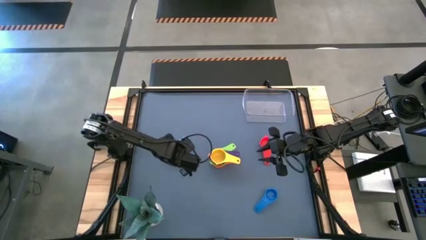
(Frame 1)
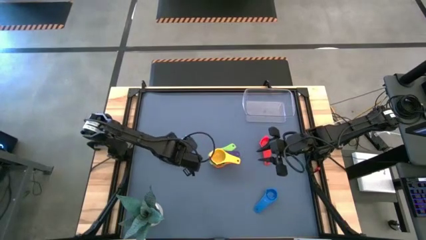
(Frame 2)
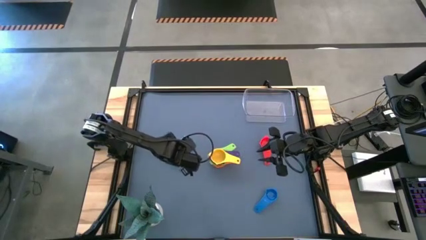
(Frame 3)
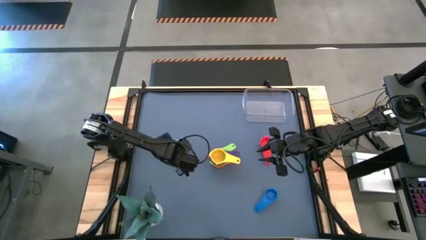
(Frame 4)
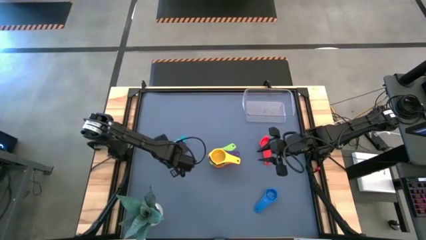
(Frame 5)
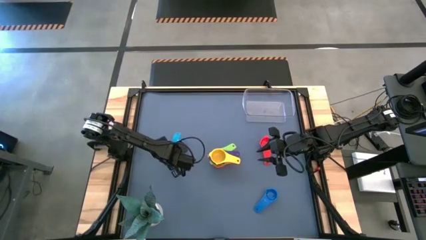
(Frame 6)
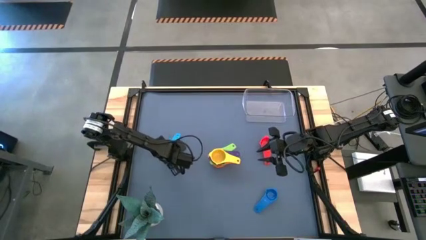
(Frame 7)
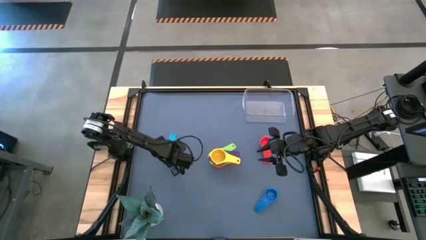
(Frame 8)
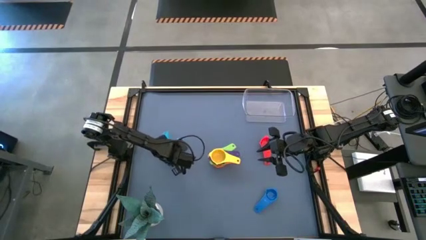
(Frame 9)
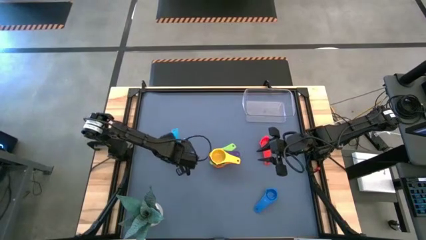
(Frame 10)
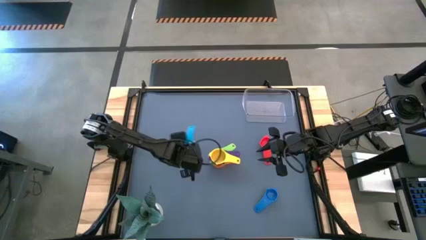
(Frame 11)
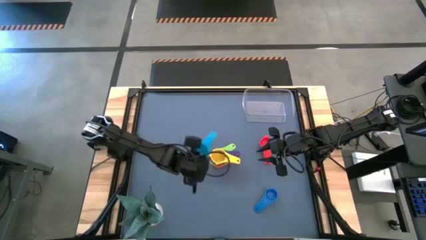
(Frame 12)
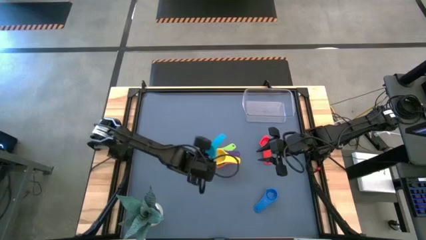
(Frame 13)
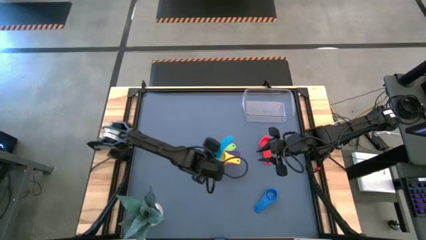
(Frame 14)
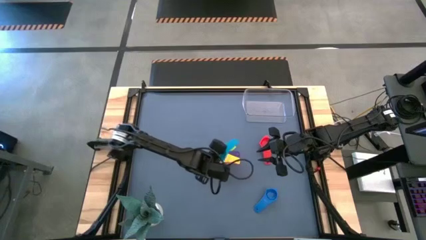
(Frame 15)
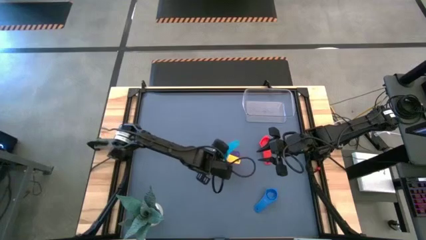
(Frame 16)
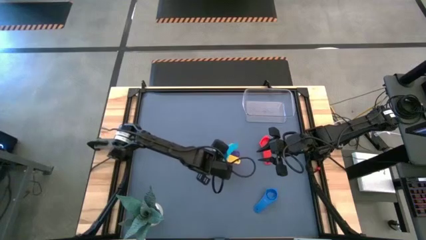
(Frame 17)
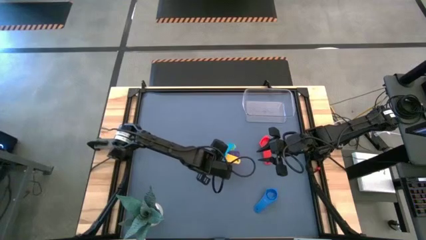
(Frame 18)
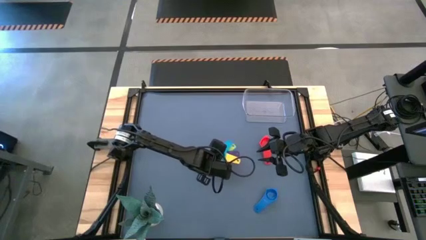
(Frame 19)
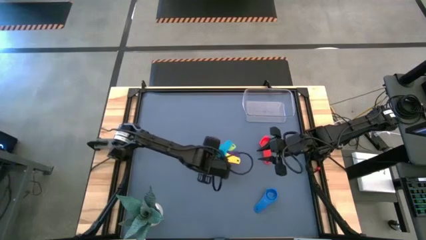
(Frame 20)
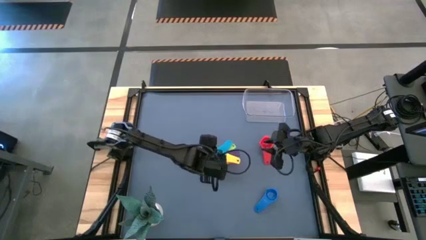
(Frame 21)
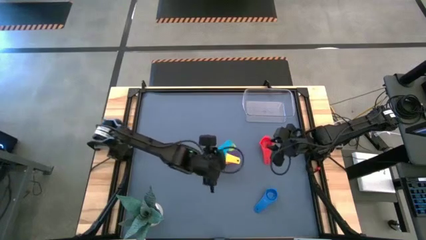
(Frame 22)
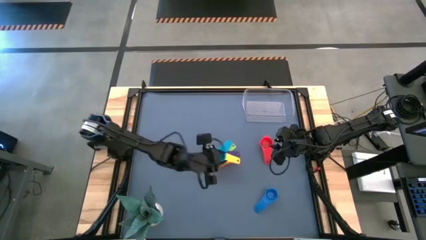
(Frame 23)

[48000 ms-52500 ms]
Task: Nest measuring cups in basket
Stack the sky blue measuring cup on top of the yellow measuring cup

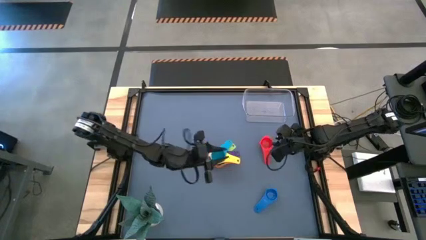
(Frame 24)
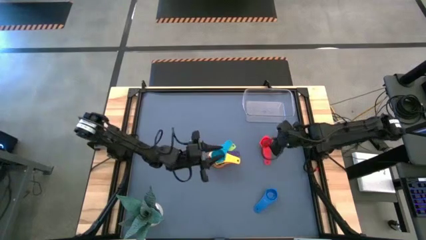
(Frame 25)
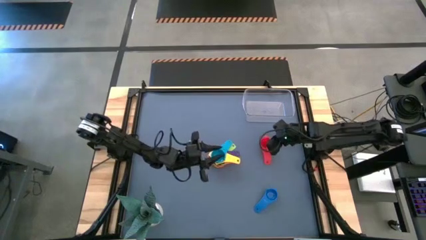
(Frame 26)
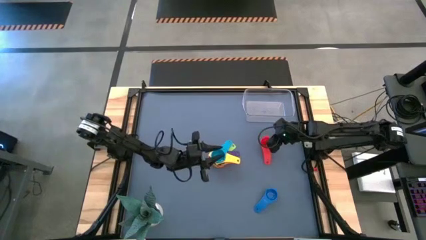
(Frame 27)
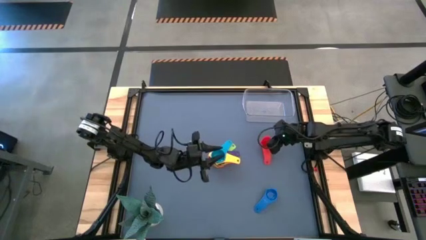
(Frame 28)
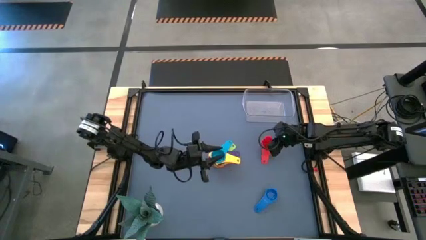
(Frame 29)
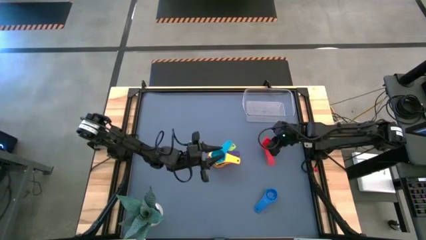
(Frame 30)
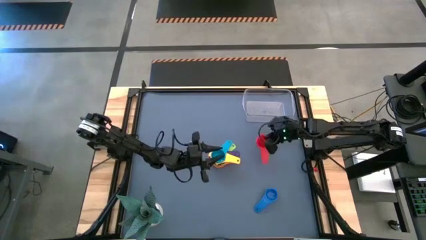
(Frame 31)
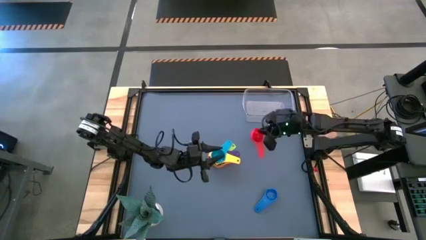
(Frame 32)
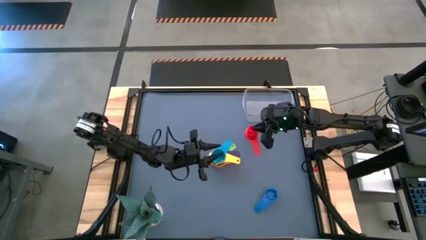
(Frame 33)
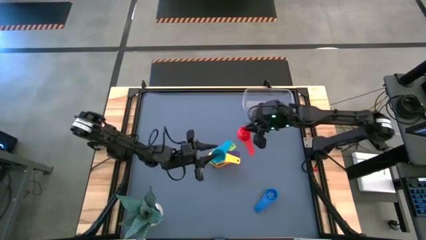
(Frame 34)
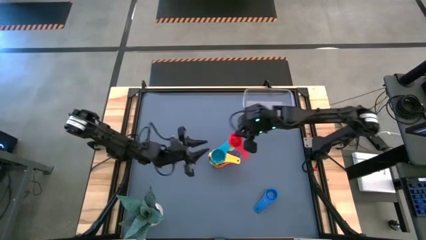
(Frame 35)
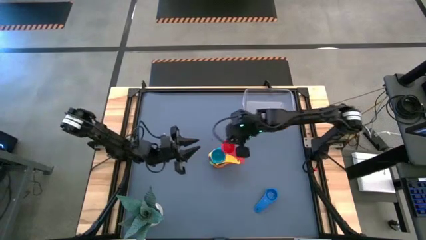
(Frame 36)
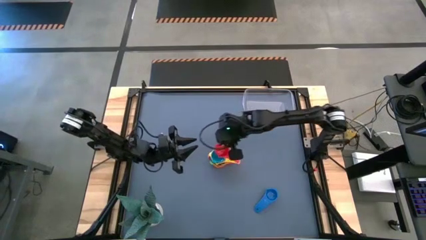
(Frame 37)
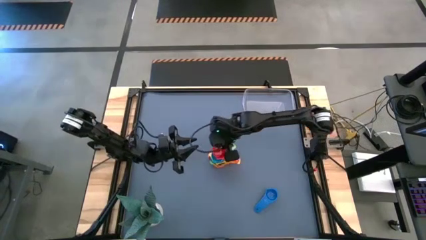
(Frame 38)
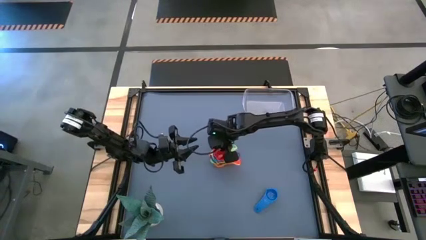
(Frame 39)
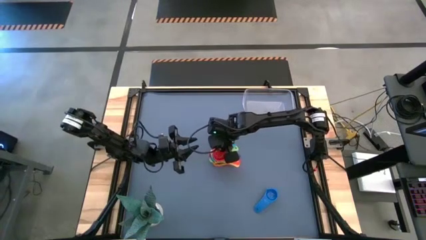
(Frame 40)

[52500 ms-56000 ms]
Stack the red measuring cup on top of the sky blue measuring cup

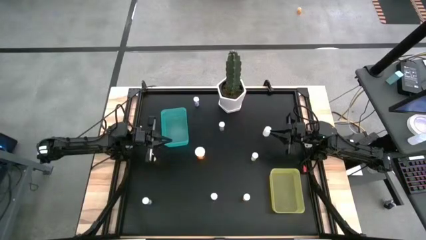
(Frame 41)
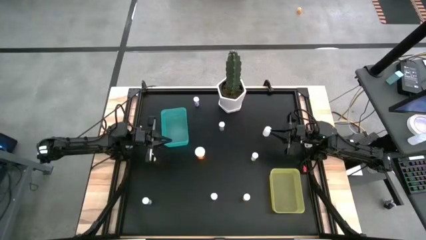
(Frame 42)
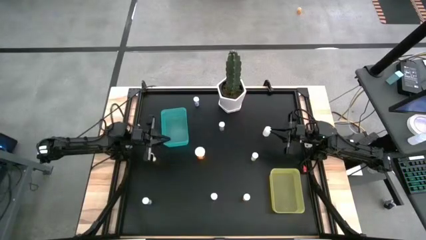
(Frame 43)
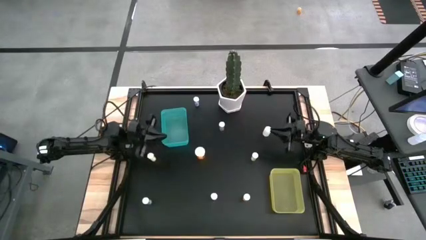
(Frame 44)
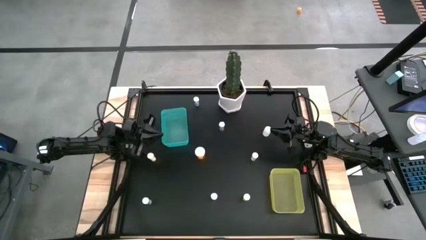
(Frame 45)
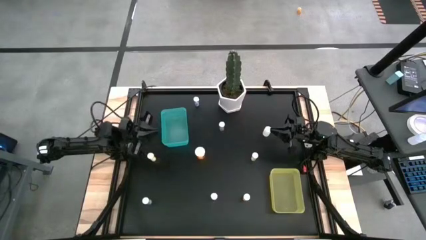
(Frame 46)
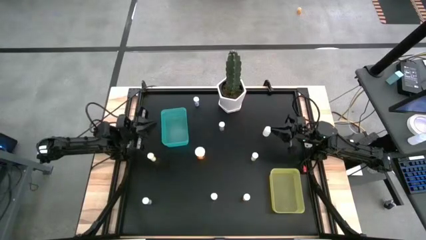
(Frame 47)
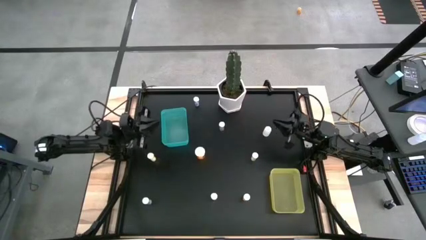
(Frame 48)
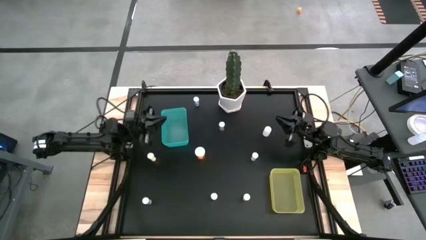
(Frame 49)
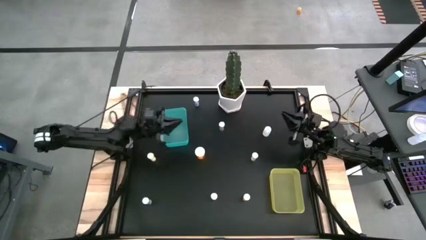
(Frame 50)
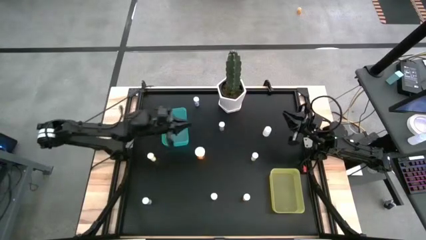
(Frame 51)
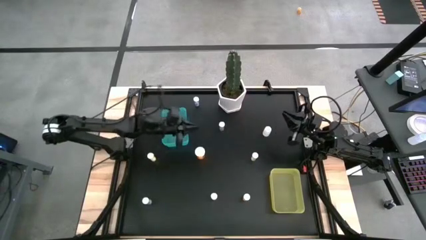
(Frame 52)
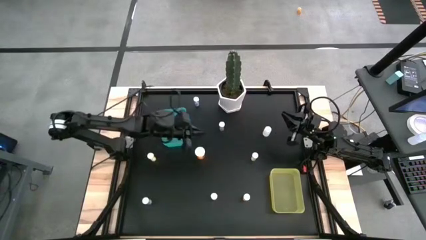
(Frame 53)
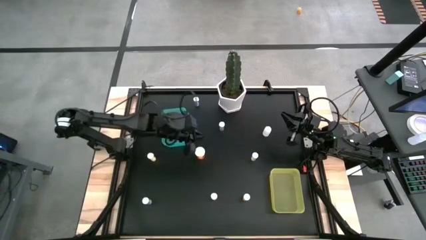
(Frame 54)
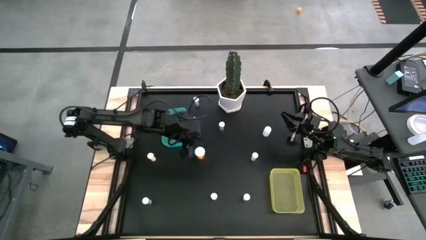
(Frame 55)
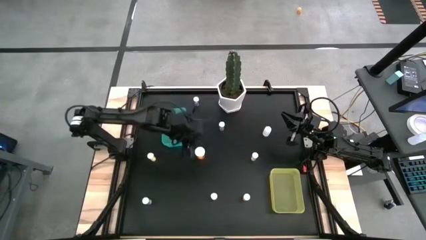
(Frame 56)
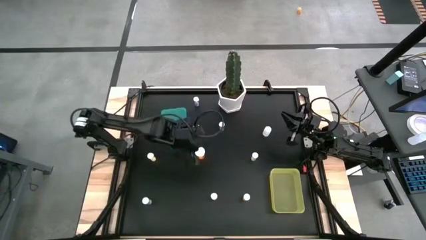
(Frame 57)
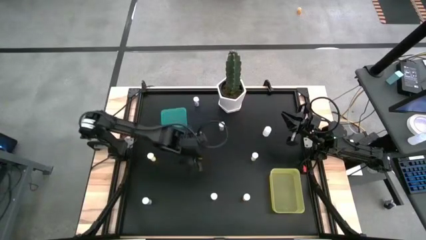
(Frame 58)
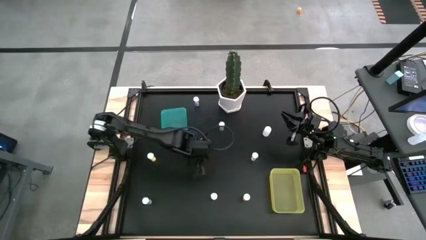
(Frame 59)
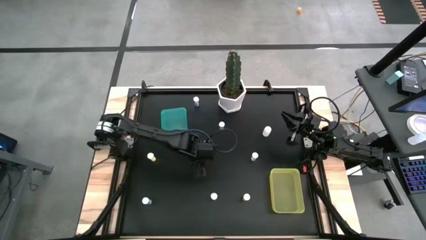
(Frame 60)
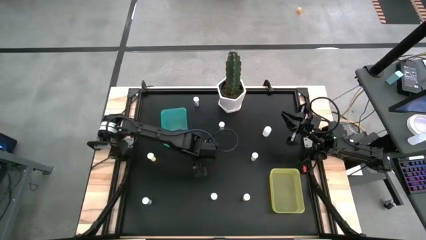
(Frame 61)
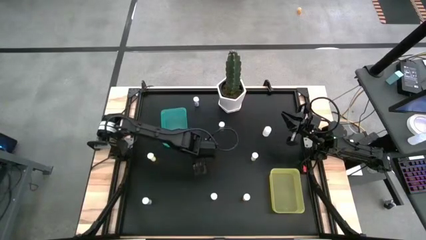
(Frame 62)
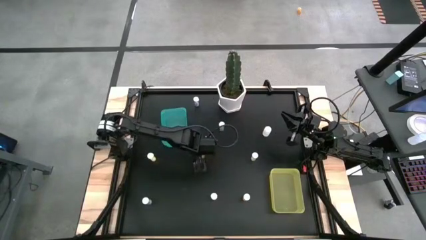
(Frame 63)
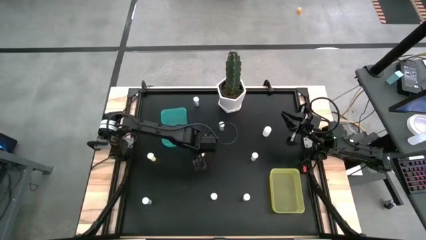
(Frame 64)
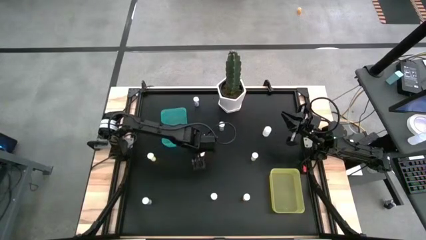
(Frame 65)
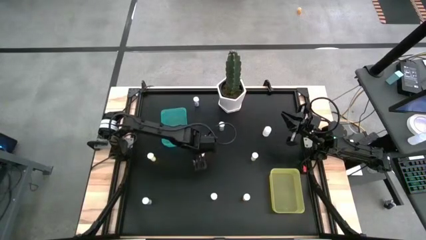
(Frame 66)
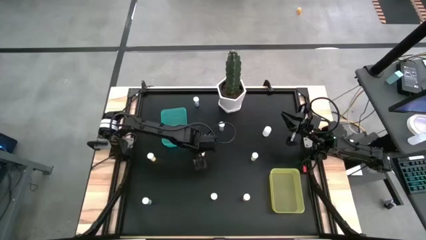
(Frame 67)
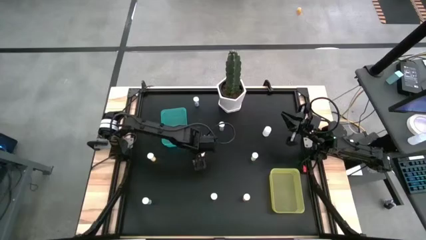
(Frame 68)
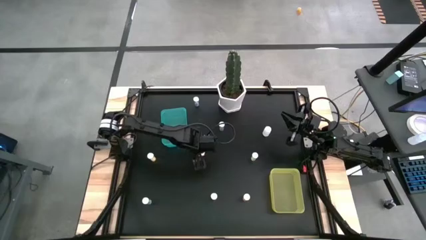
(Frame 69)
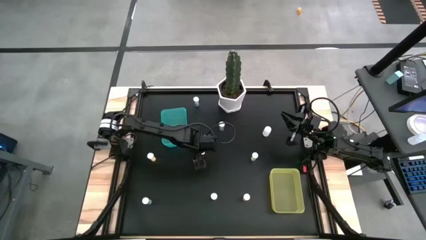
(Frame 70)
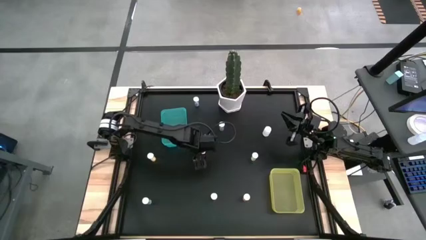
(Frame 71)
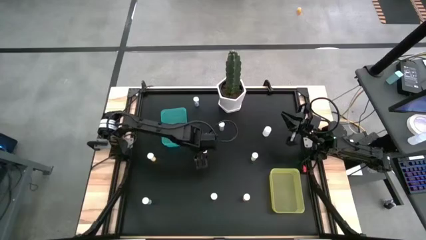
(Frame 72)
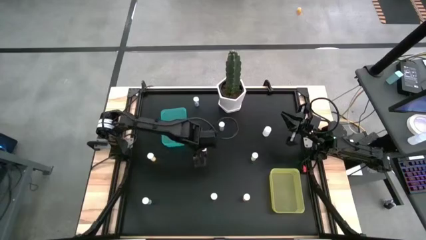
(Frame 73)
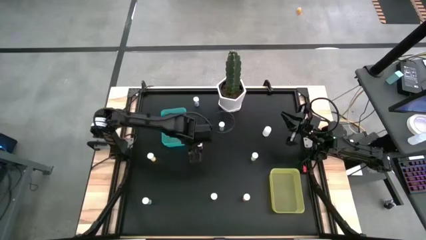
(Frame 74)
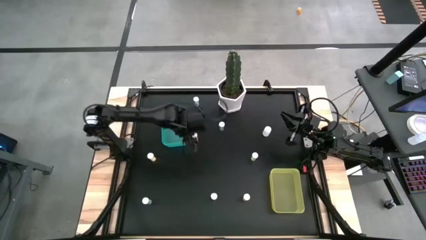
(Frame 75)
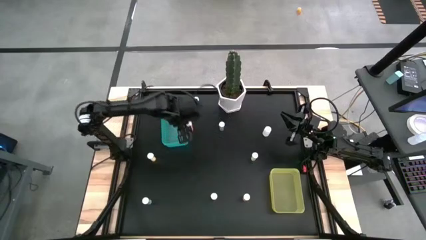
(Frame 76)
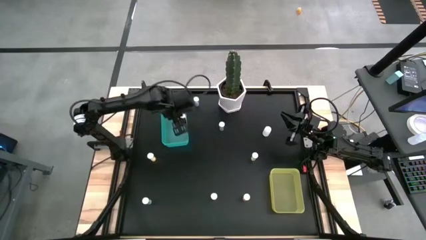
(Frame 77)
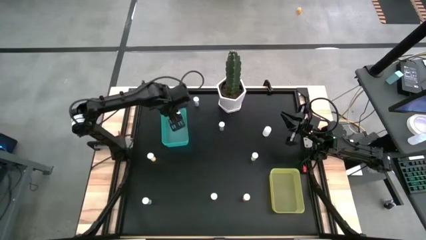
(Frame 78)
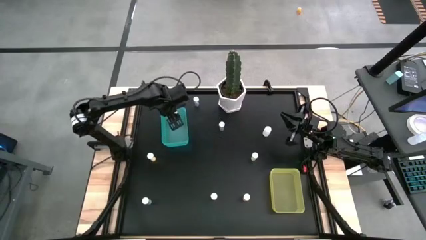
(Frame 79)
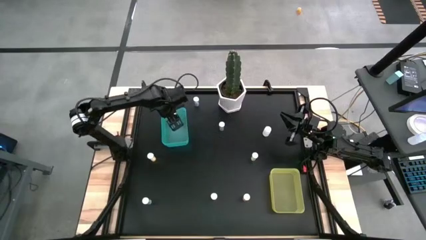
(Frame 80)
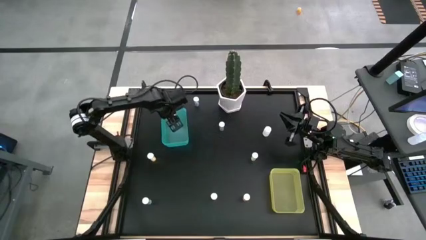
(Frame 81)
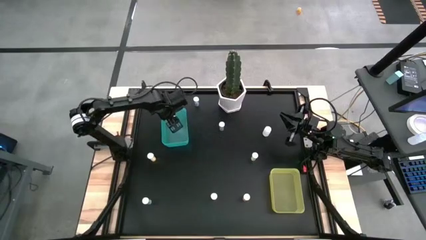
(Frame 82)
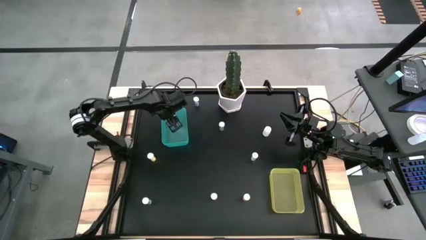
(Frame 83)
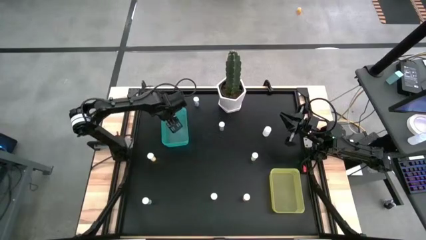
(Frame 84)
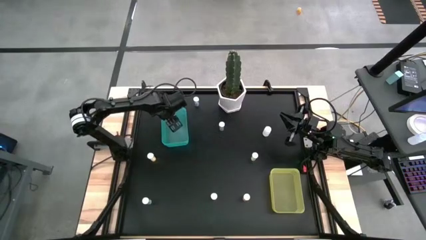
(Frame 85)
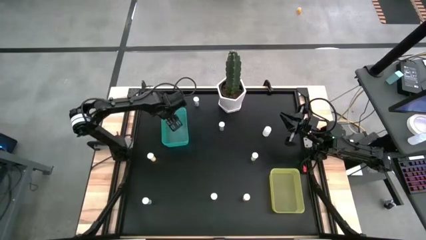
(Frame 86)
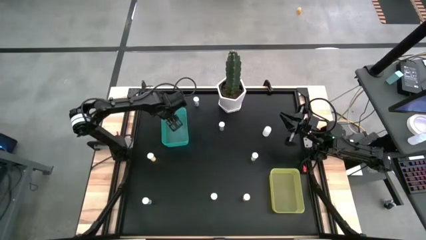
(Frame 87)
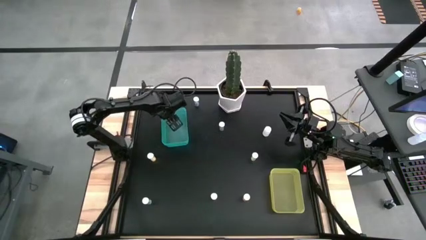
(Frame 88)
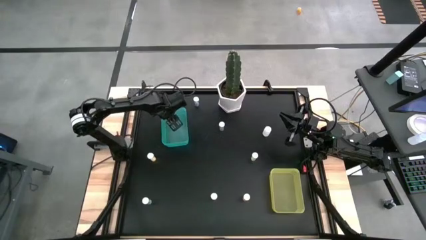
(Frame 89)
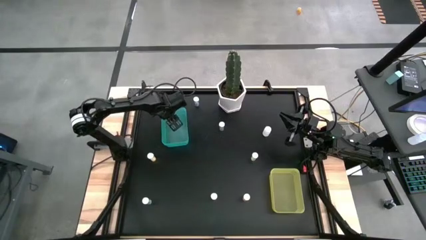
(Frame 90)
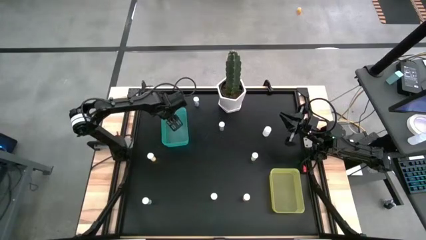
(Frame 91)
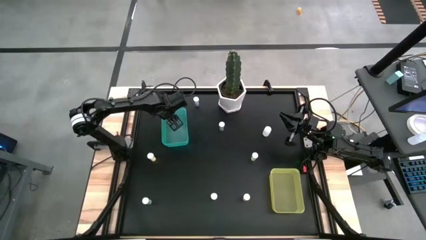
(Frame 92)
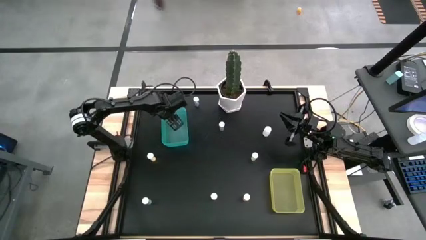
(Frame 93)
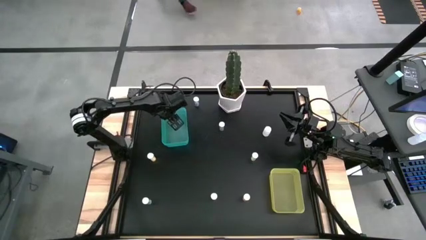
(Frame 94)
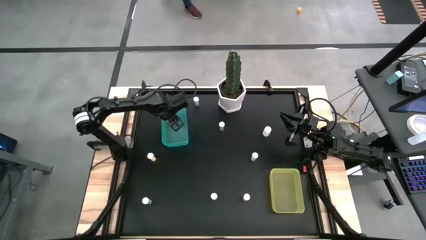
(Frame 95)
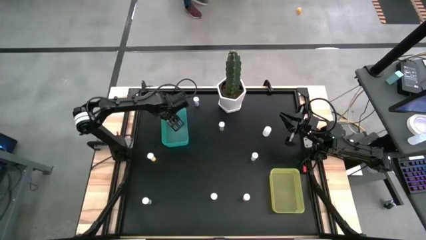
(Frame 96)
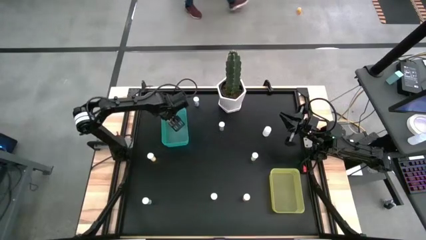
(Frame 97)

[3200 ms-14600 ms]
Task: Pick and place medicine bottles into bin by pill shape (circle, oval)
Put the orange capsule bottle into the blue bin
